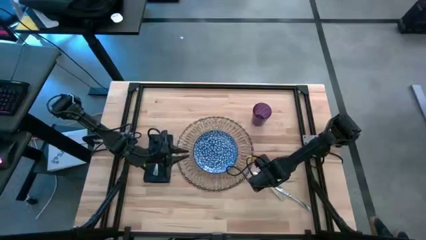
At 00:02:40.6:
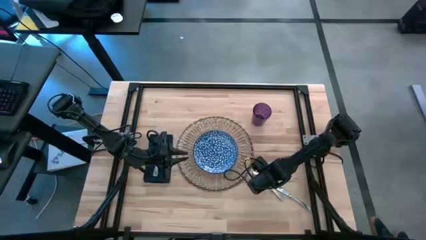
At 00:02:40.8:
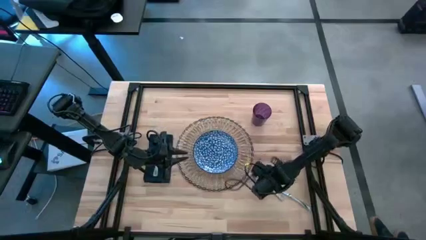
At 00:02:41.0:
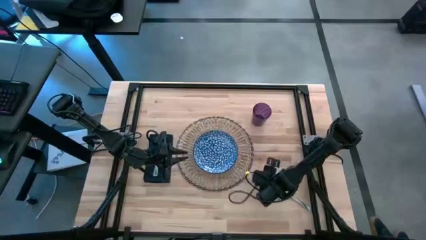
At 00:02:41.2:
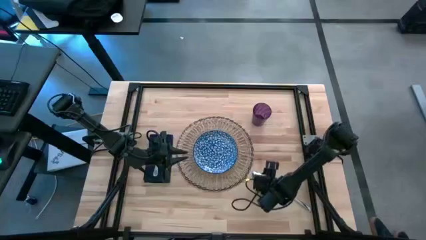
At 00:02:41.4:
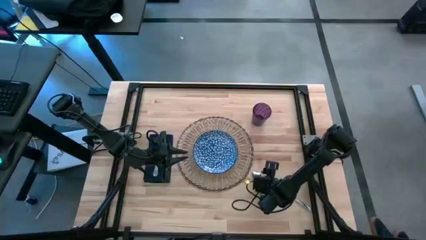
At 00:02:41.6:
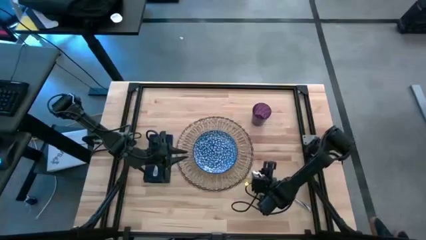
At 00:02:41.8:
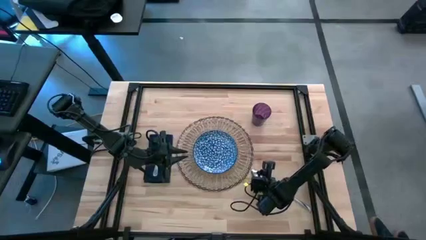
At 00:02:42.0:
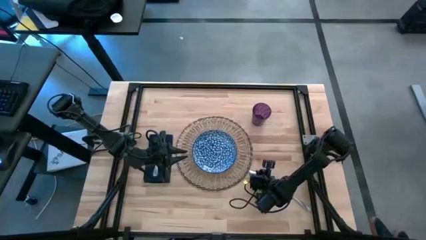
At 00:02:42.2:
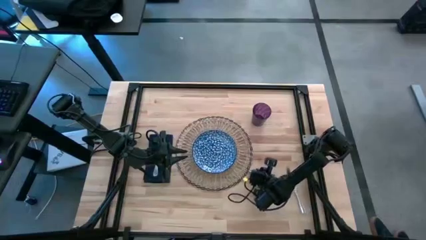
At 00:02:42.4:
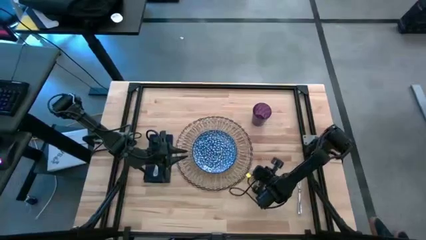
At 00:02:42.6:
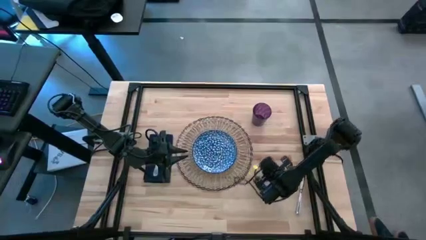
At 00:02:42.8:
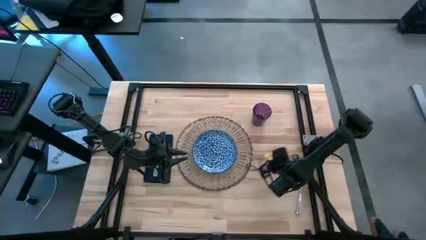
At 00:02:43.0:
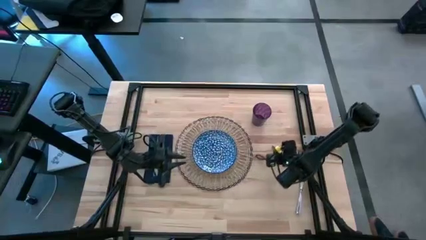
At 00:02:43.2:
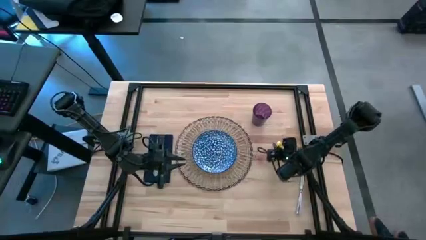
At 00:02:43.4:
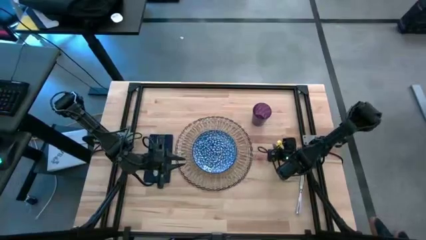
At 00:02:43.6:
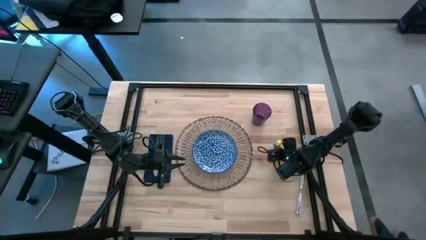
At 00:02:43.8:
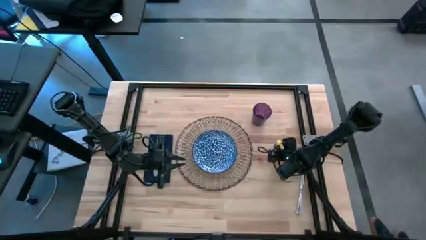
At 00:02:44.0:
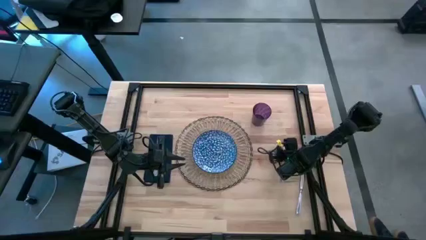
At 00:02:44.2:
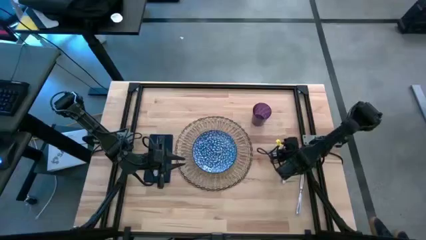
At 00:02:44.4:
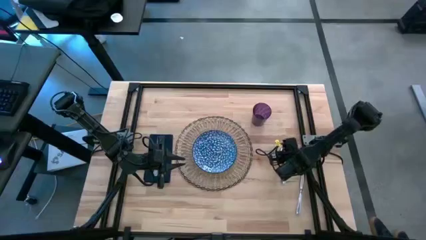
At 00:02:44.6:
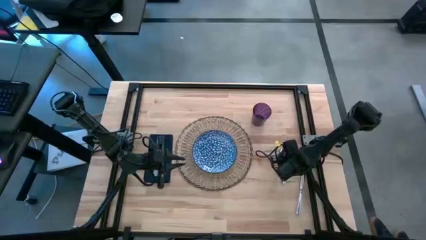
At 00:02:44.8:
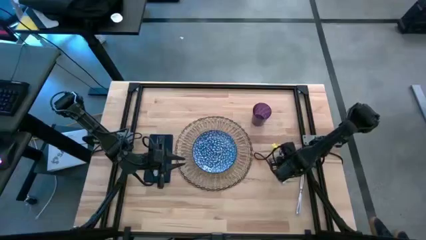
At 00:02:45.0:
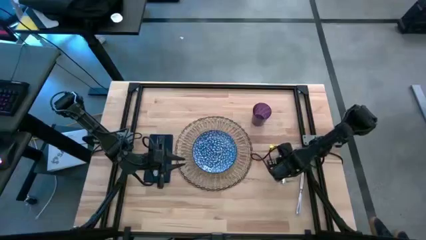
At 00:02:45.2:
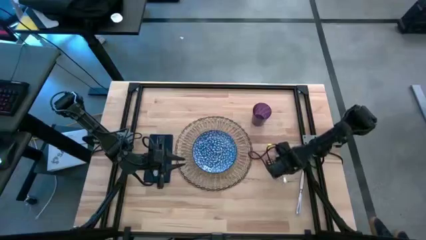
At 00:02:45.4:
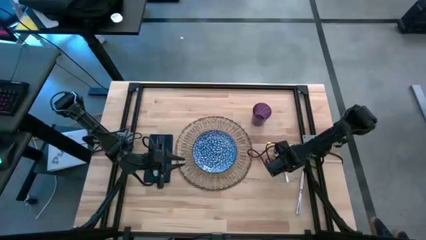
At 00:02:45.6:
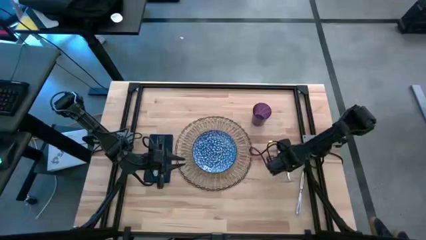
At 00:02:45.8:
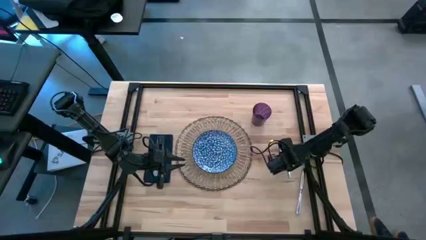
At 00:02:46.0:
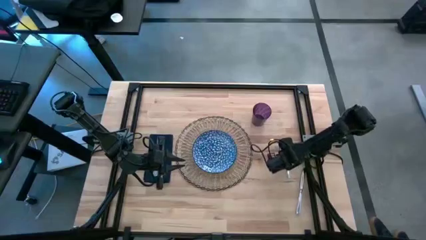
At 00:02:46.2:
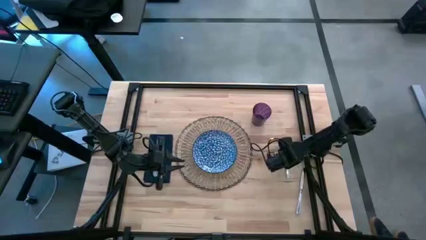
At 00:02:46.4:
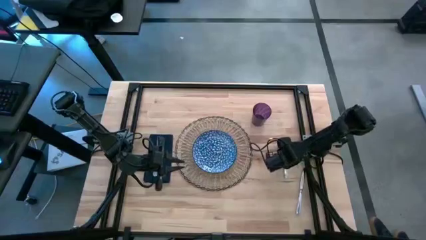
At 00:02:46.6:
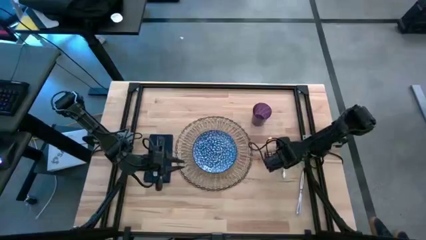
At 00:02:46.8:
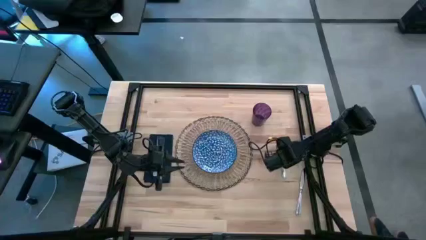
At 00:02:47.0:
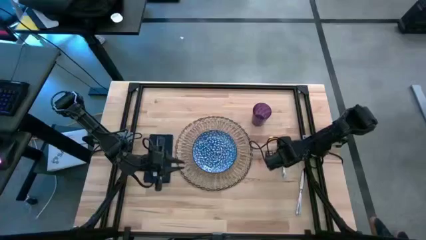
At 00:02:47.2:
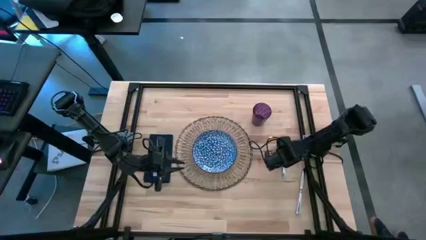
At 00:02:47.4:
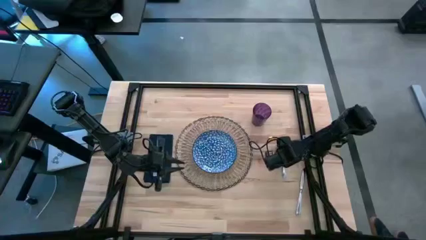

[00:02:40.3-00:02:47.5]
Task: Set table place
Move the silver spoon to the right of table mat on the table

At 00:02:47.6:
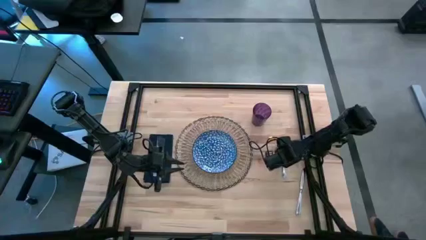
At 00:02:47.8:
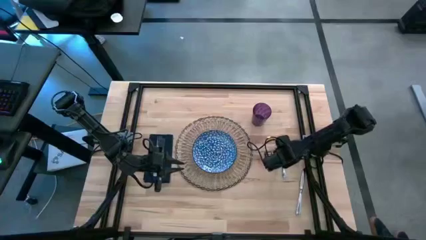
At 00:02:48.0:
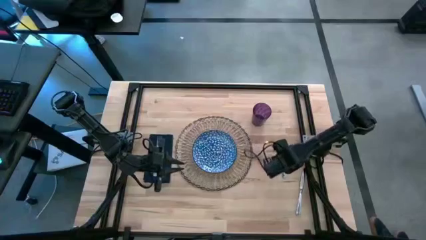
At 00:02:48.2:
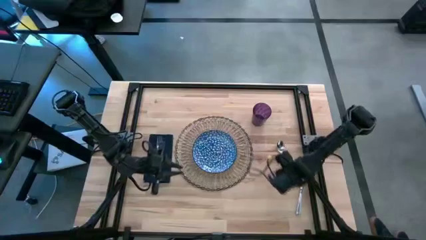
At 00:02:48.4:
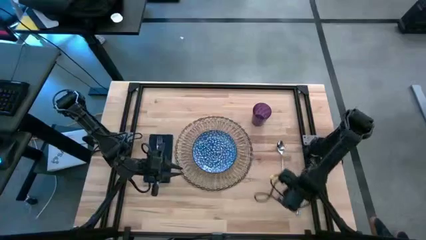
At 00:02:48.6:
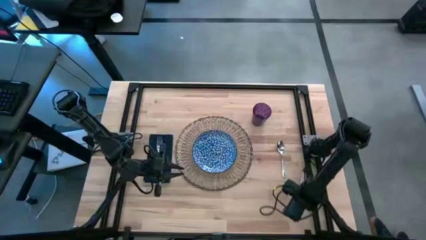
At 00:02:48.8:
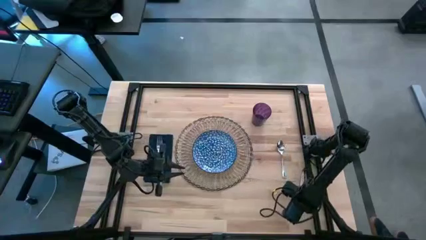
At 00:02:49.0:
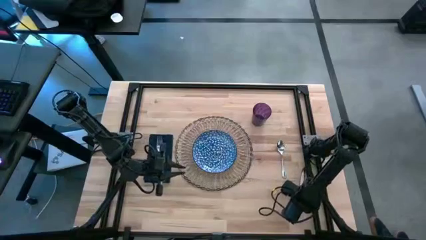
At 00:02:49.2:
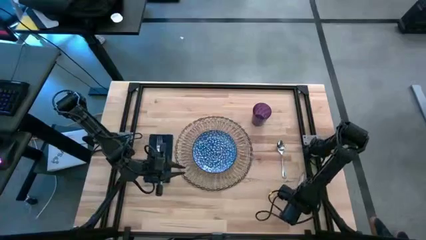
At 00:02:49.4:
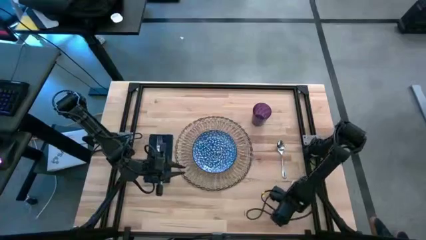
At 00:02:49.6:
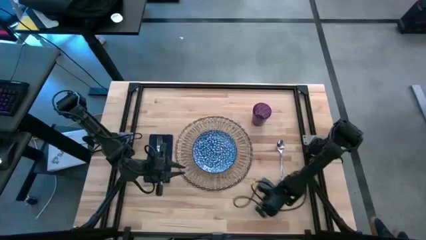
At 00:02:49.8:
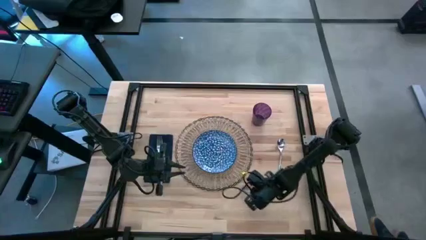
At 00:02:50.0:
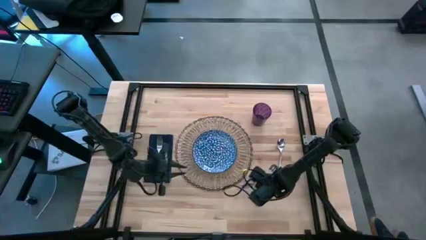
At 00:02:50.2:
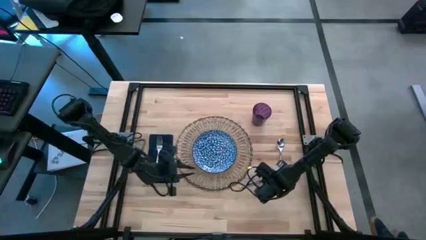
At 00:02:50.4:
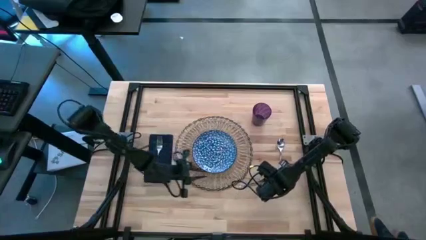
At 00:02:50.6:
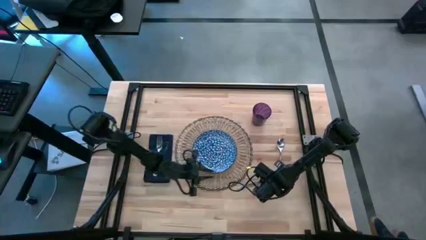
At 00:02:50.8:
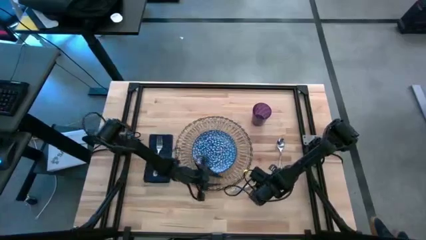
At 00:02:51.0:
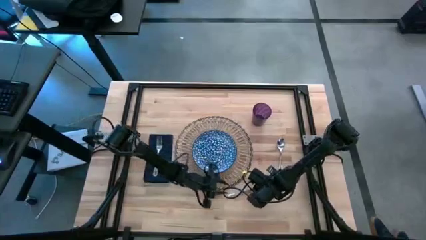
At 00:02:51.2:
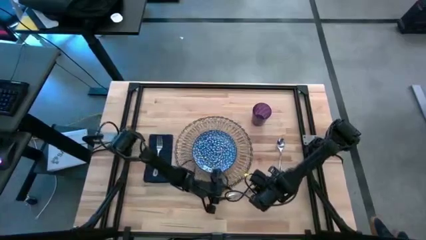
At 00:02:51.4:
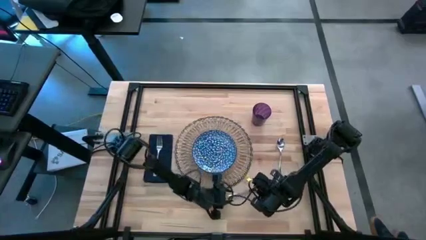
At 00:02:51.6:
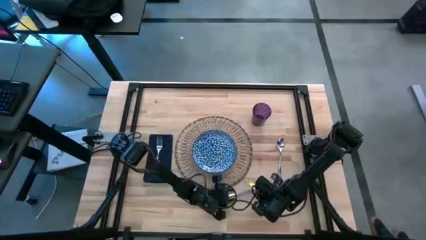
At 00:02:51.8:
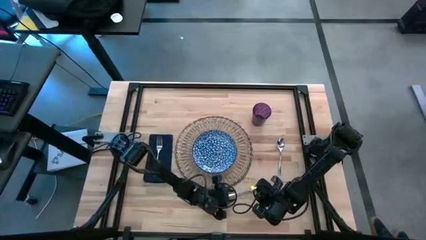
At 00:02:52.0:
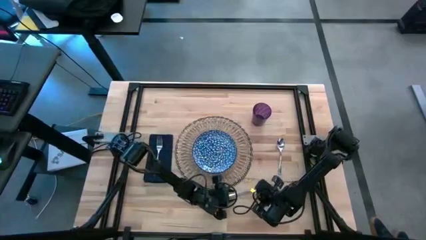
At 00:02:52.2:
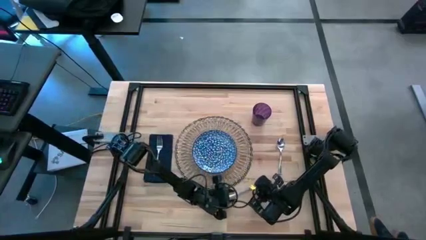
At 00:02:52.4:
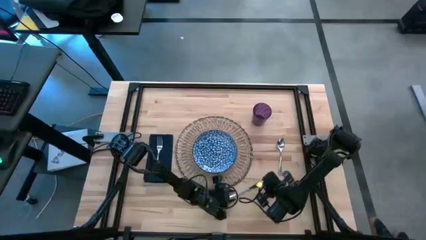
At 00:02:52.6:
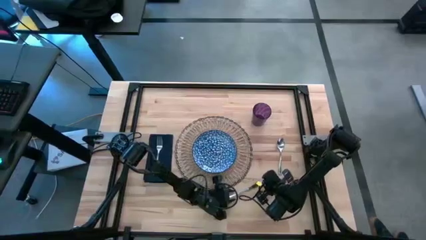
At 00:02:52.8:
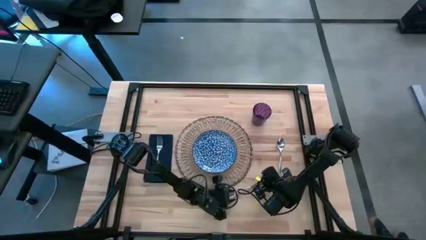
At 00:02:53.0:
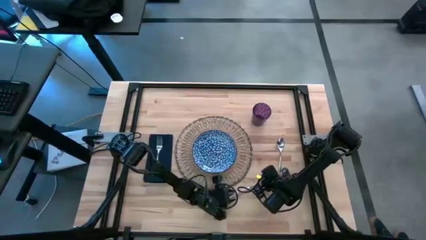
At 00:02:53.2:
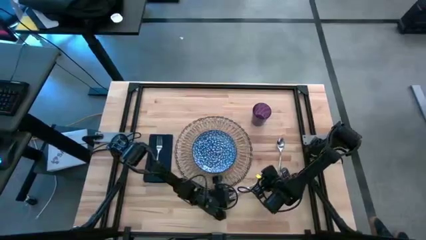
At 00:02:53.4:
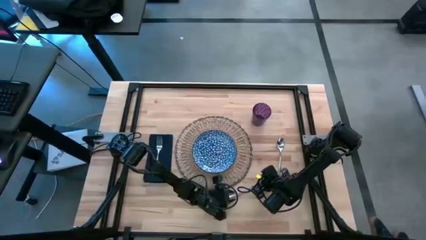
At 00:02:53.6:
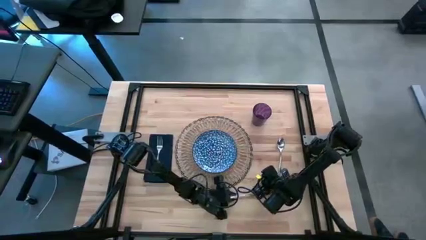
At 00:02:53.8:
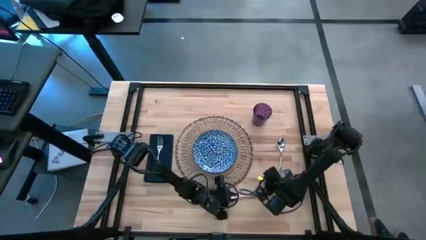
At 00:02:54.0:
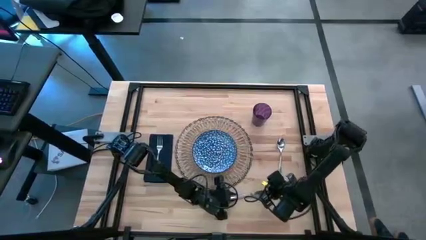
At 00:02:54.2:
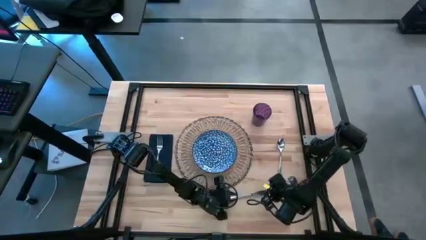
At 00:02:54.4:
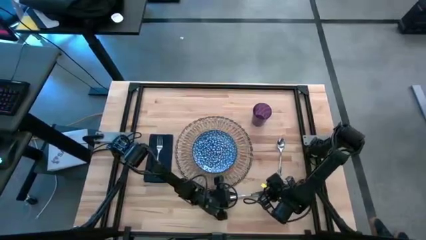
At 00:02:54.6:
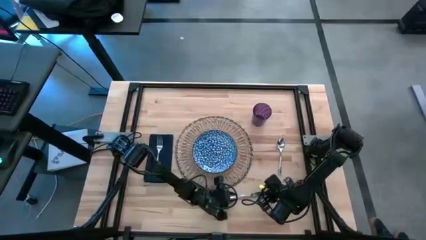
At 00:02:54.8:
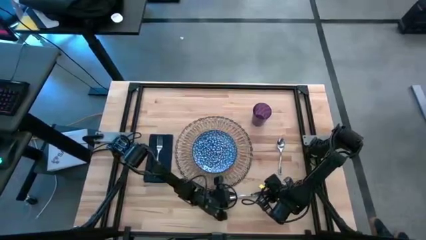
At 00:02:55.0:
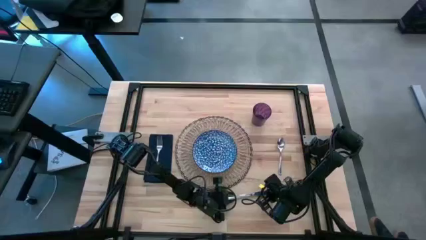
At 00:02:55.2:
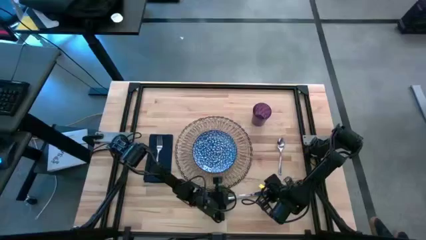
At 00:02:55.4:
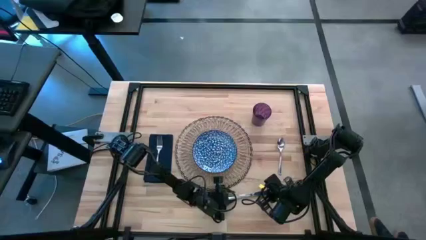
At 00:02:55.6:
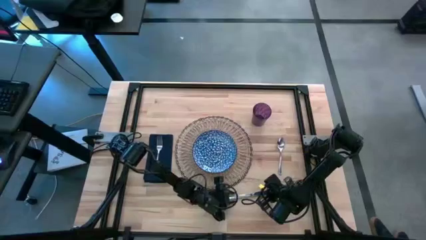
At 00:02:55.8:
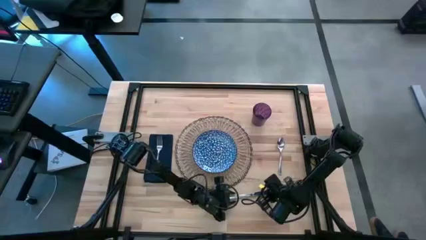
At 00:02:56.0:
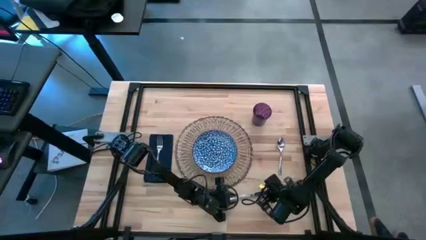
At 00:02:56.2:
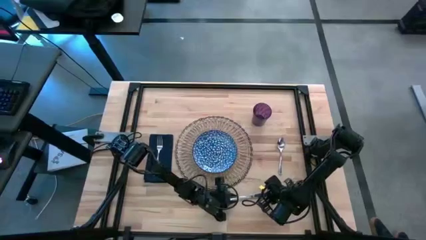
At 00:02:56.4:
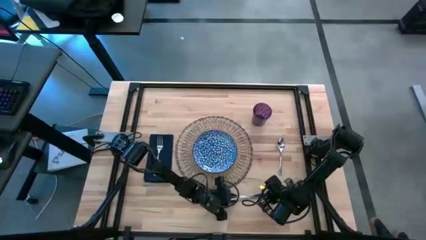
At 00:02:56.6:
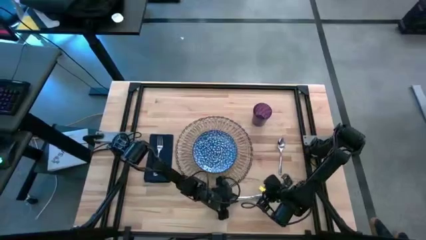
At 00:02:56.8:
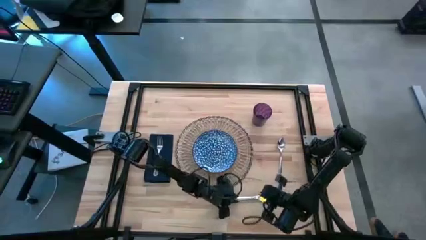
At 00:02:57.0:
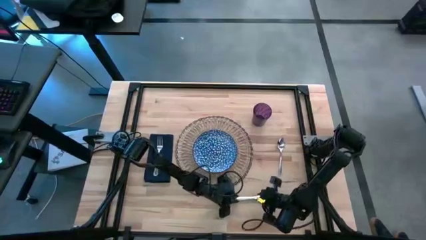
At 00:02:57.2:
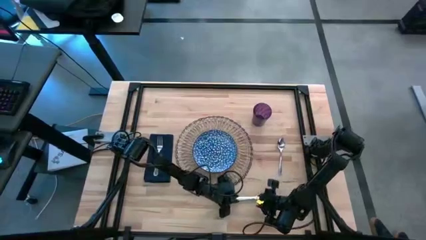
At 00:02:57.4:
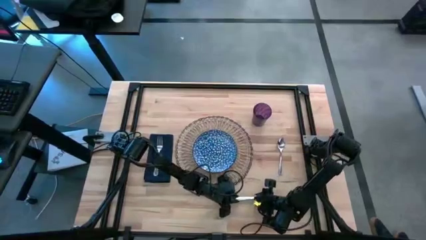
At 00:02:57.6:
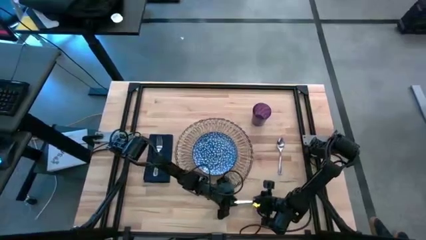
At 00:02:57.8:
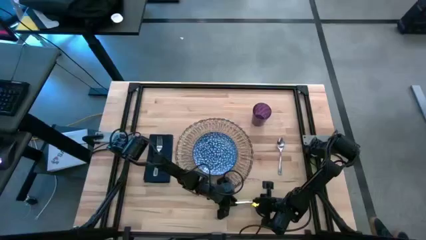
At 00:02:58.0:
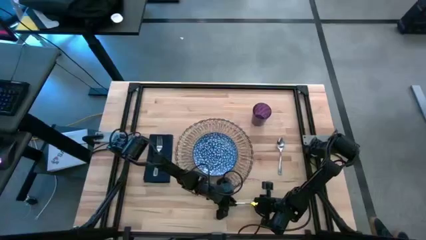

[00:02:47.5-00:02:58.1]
Move the silver knife to the left of the silver spoon on the table
